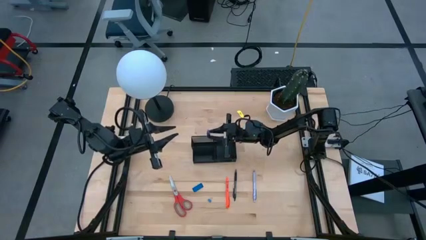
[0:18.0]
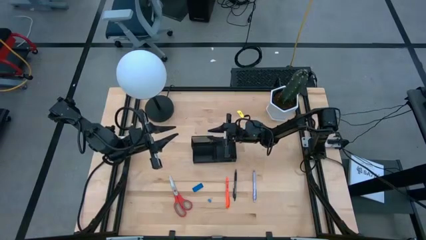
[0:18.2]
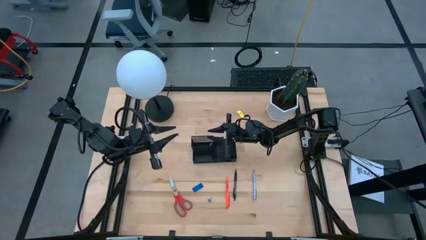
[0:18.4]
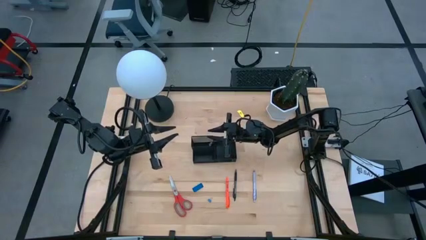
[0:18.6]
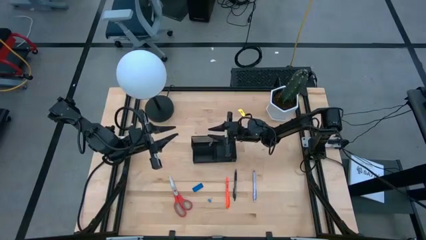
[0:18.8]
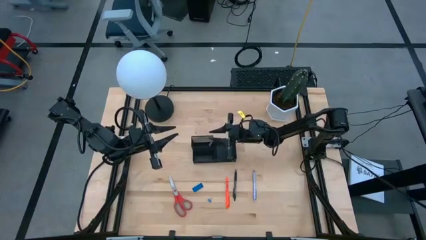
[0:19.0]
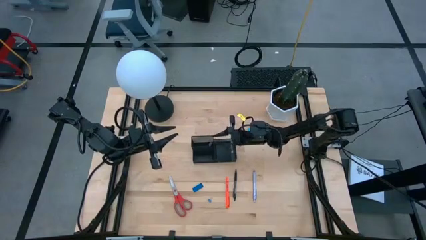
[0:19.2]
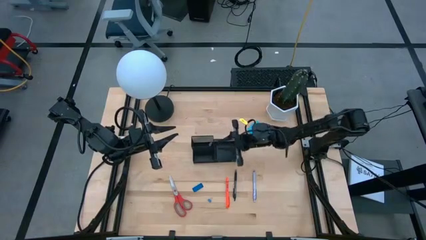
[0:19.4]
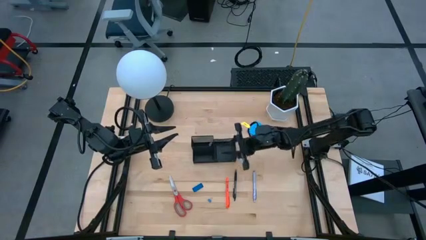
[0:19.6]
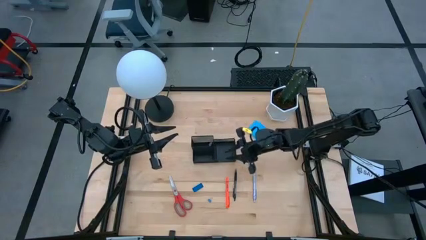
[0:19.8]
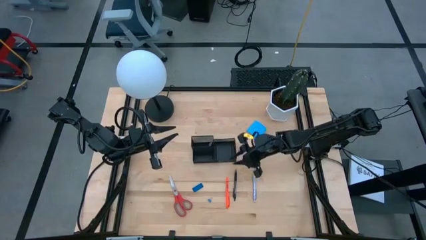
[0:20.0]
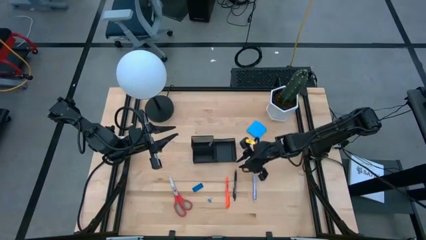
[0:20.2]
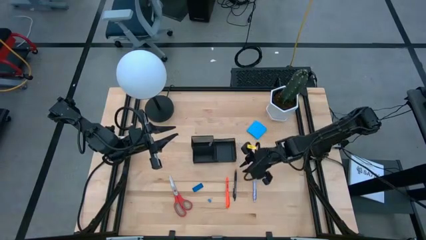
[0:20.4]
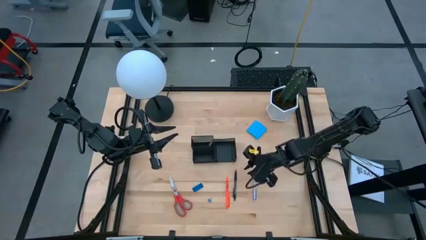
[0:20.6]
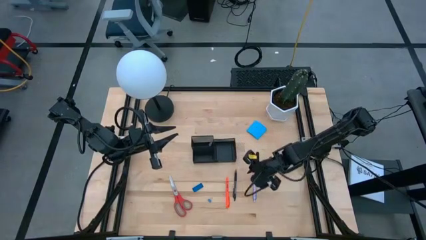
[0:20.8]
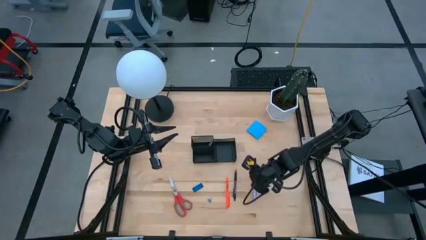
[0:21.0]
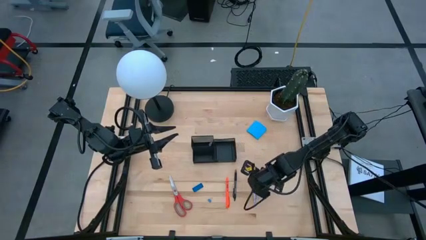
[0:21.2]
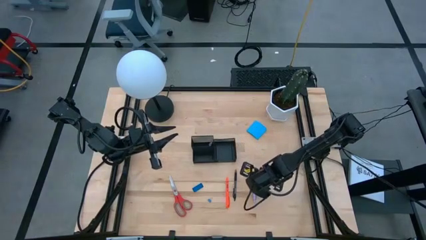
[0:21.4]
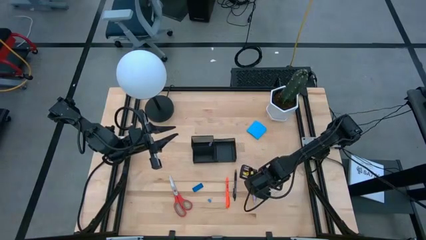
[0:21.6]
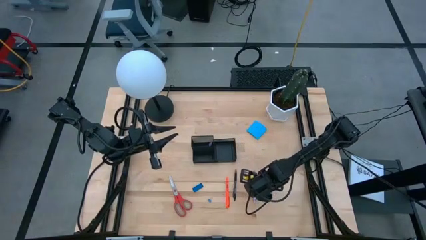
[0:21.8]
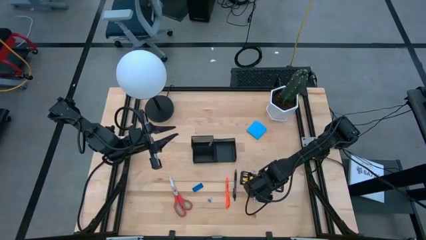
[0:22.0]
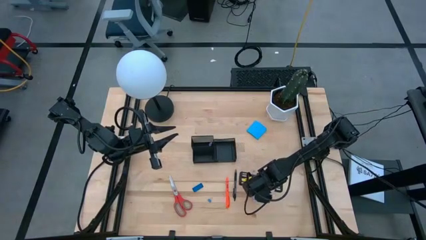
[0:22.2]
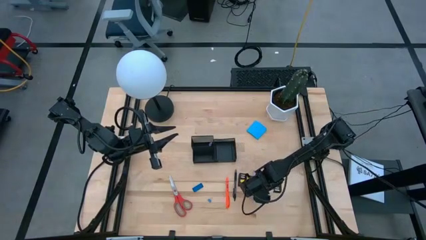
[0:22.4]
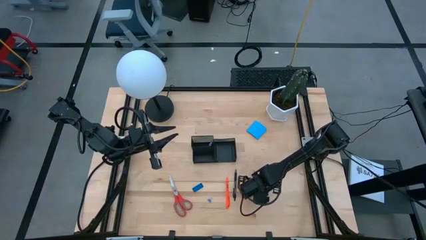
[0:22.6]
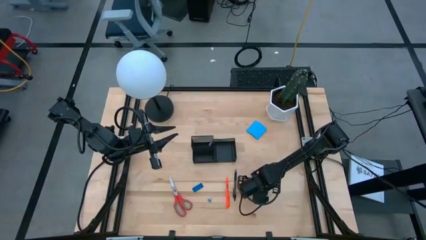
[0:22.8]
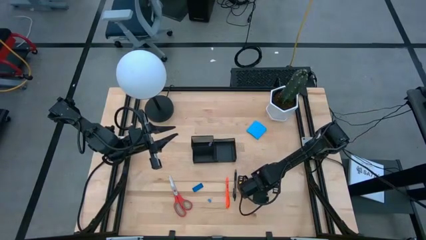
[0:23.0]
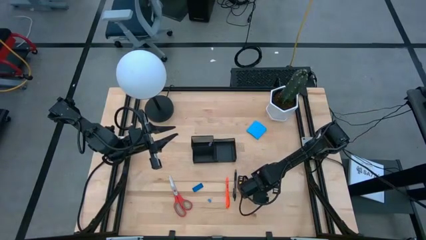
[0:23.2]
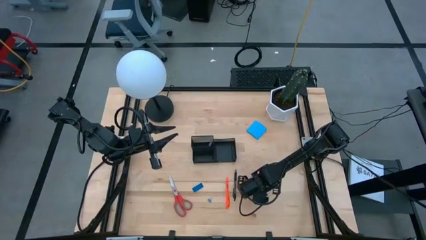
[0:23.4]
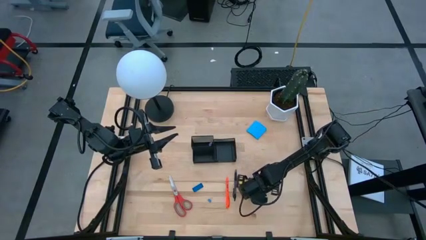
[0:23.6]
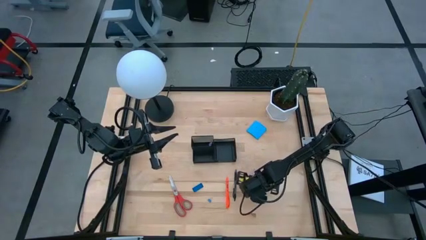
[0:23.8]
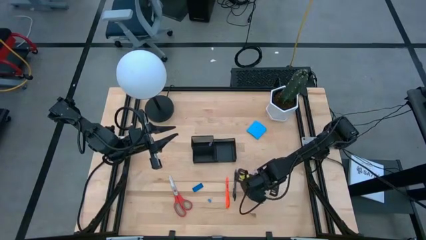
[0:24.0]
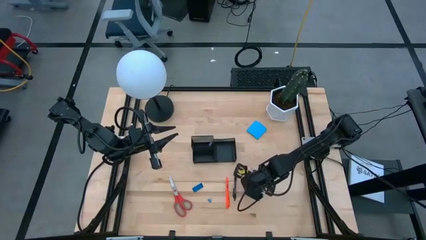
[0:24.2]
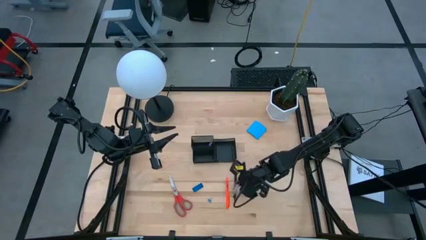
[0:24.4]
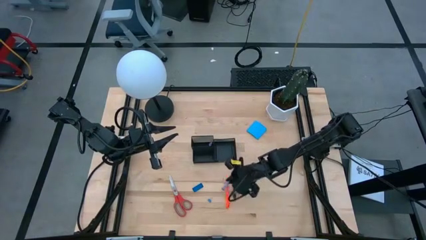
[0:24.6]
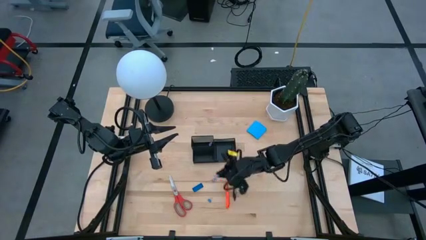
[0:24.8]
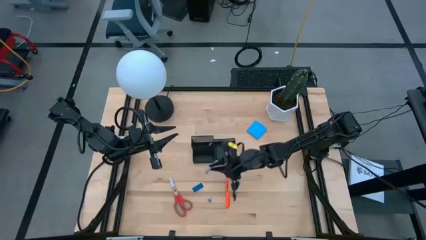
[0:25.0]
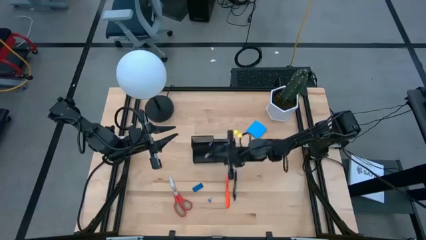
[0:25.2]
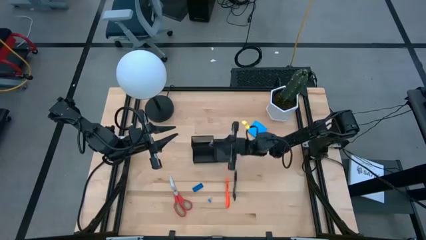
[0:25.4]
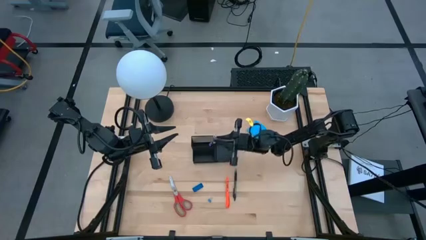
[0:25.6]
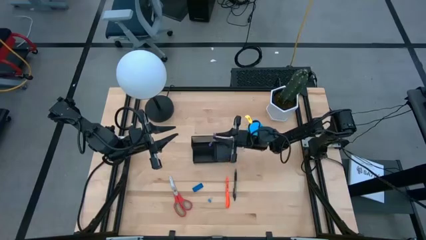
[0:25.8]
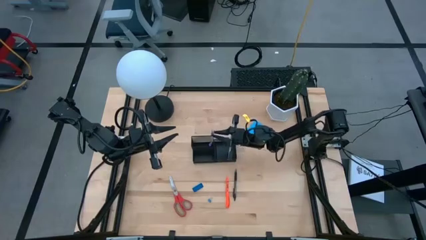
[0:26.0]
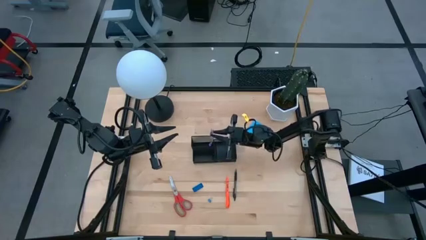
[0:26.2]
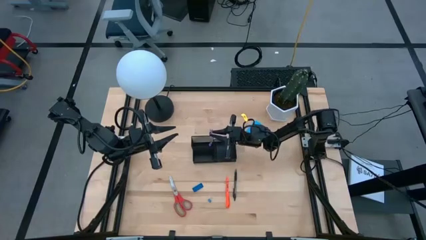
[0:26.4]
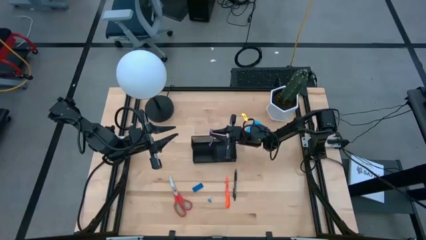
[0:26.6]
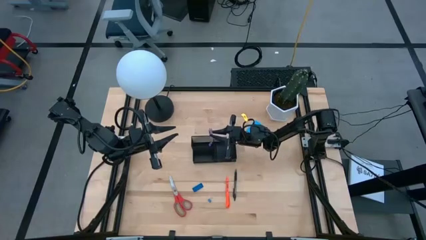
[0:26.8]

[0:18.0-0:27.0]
Task: Pick and place office supplies into organizer
Put the purple pen into the black desk organizer

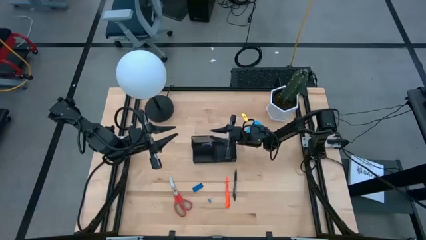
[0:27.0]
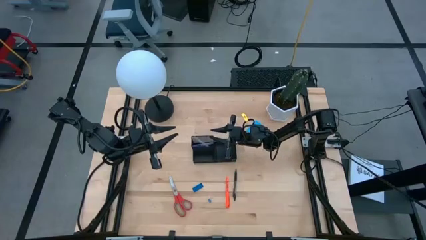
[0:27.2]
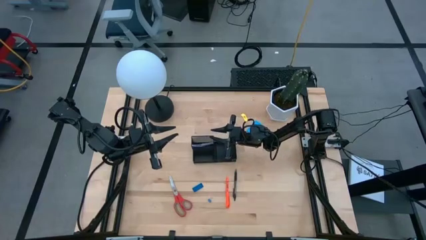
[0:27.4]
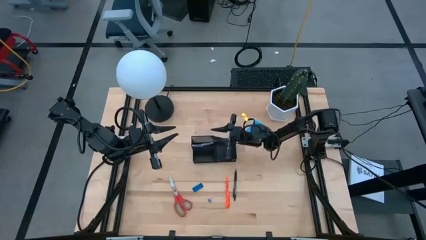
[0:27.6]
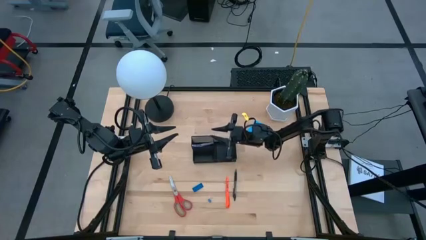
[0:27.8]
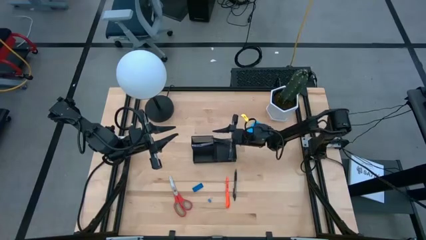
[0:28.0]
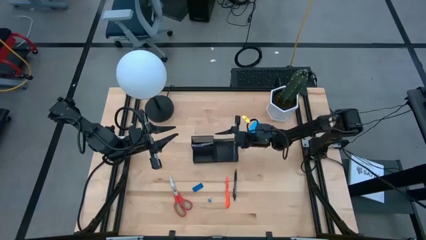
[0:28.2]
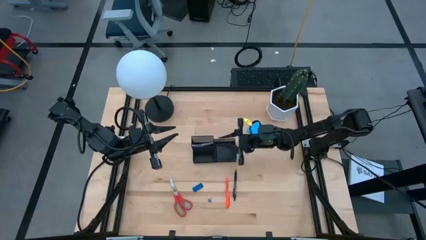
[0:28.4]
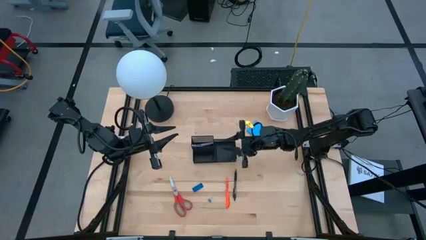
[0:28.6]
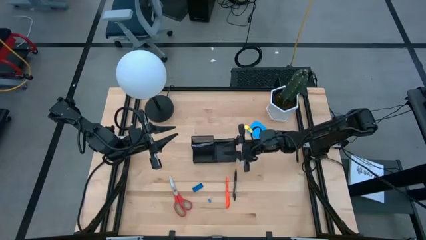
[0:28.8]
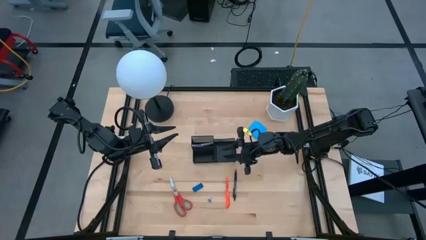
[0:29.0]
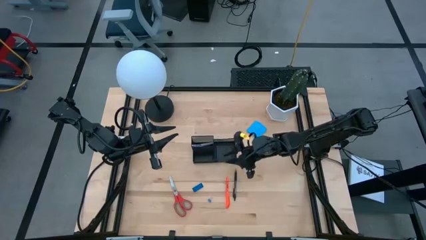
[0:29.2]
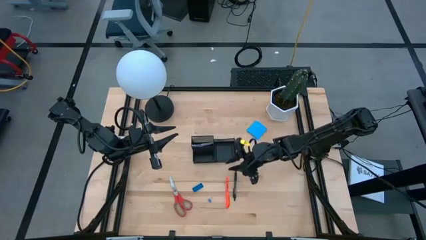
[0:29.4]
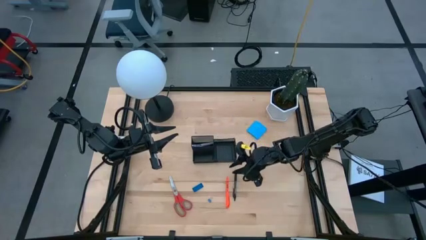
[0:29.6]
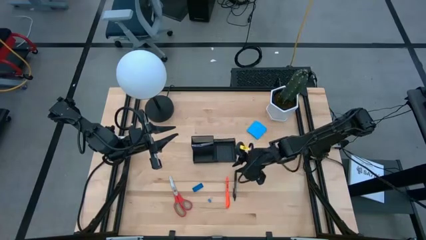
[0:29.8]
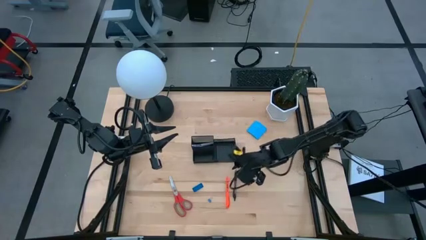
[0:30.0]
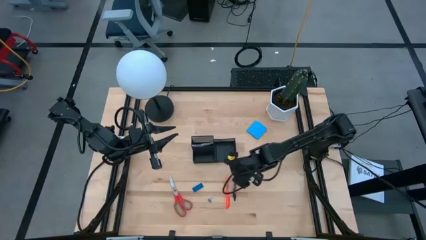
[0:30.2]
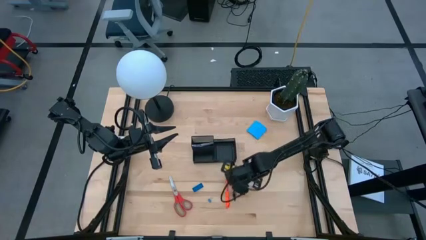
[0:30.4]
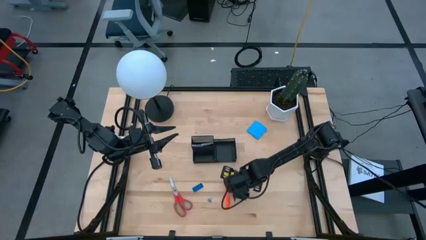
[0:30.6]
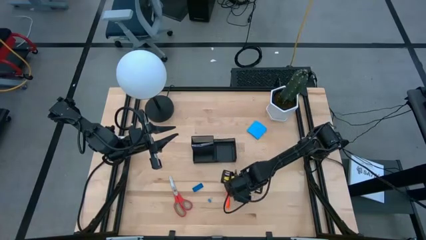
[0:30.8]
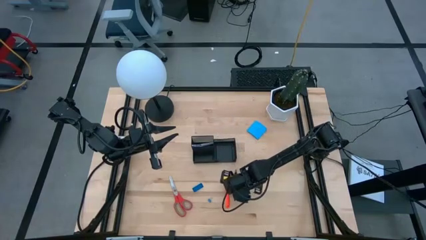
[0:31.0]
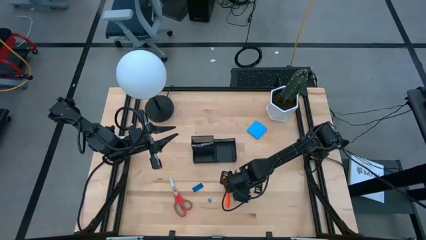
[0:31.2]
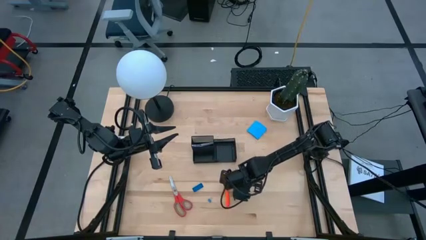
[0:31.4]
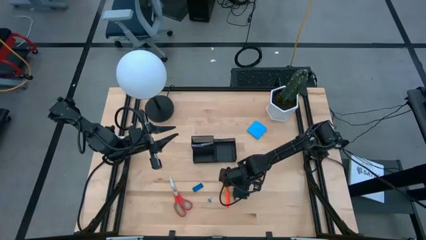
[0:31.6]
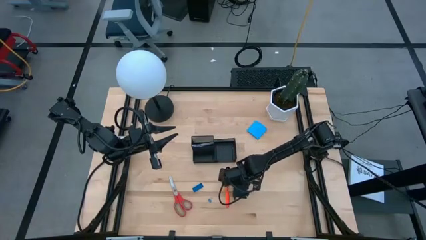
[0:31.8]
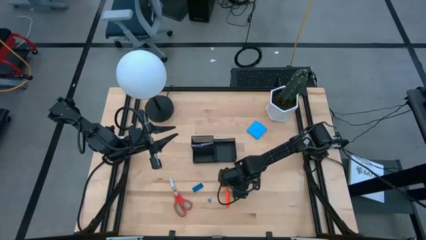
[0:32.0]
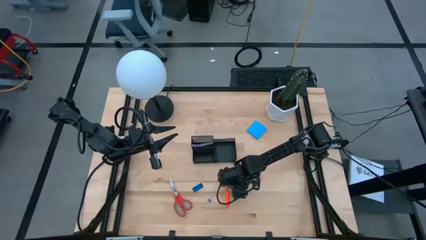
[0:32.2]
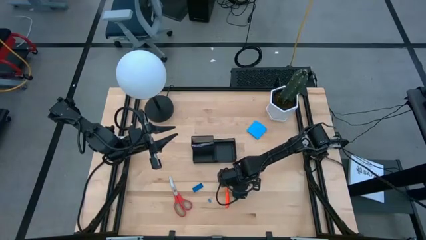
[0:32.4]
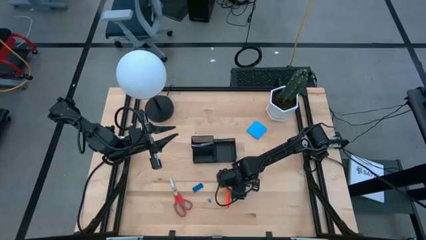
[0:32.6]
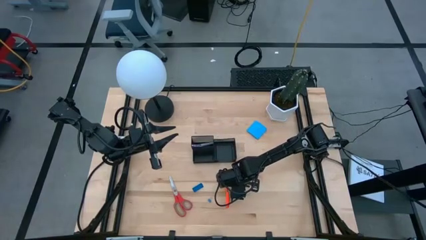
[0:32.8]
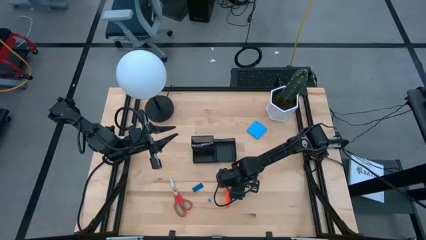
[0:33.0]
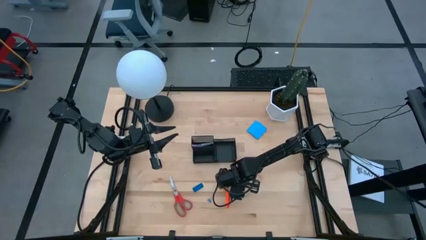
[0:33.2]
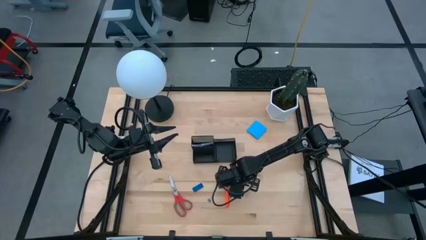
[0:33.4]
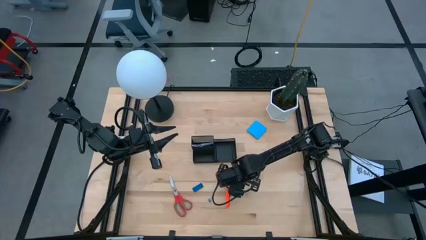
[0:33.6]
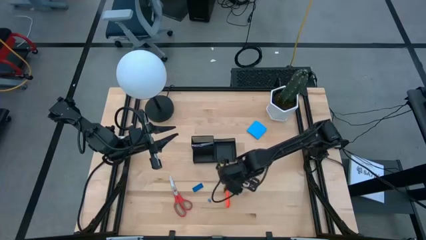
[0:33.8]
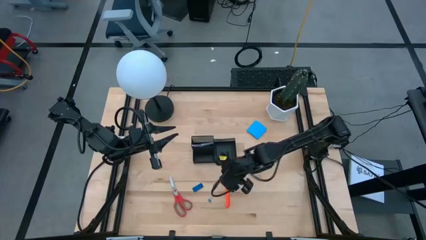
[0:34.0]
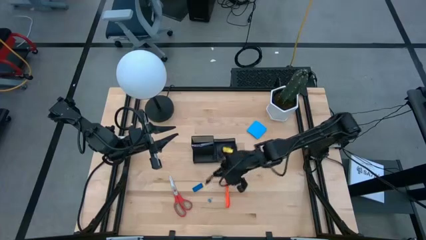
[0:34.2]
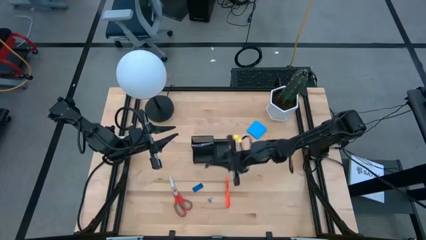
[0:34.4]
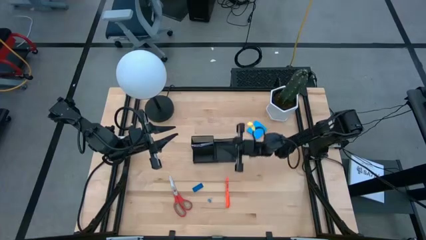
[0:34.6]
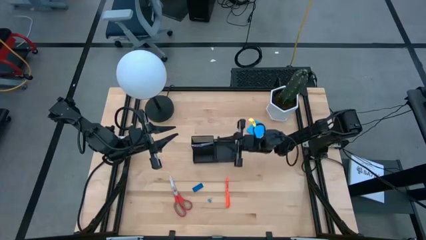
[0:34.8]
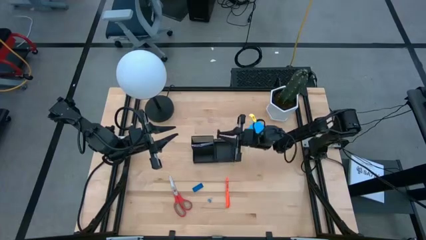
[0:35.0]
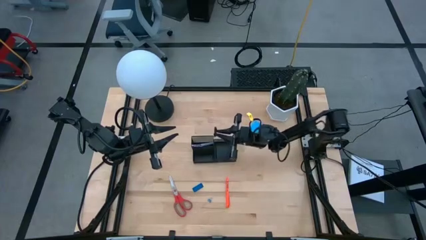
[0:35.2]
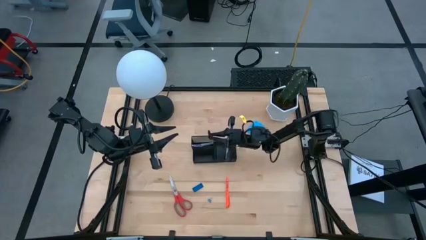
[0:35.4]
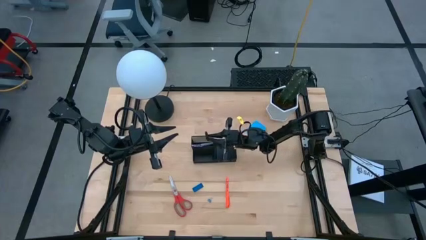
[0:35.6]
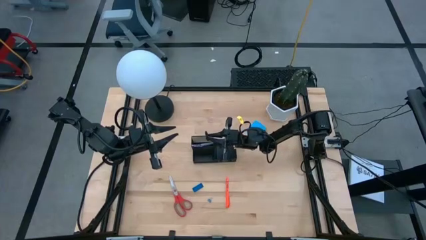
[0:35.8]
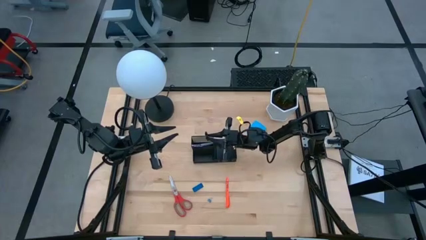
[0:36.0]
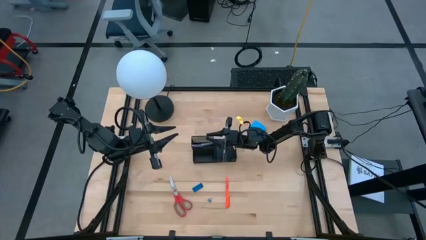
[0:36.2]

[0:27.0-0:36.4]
Put the black pen into the black desk organizer
